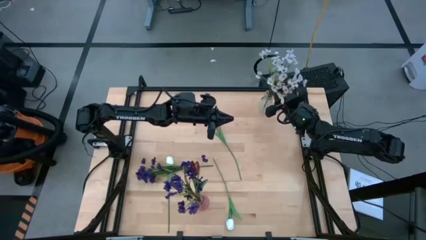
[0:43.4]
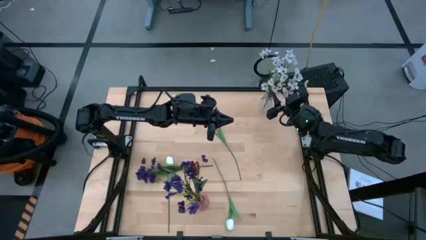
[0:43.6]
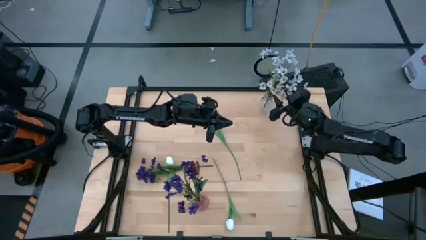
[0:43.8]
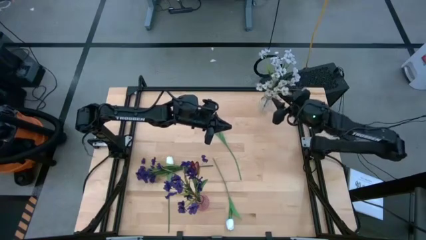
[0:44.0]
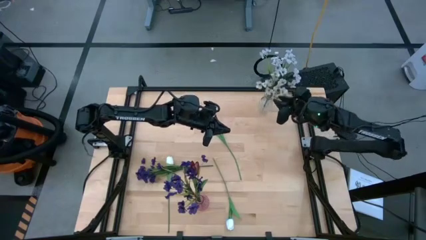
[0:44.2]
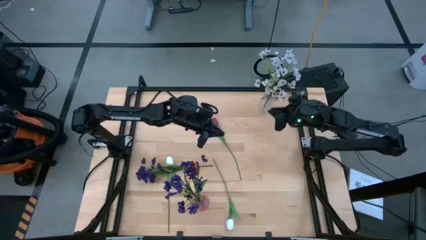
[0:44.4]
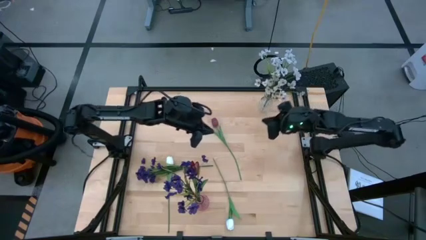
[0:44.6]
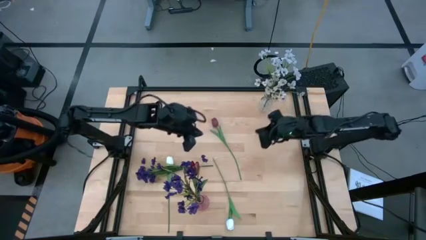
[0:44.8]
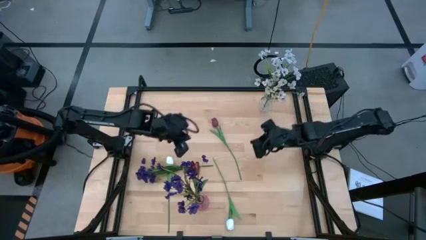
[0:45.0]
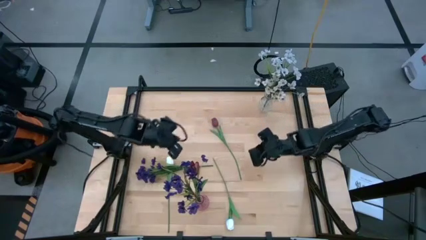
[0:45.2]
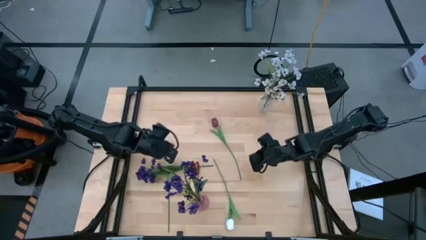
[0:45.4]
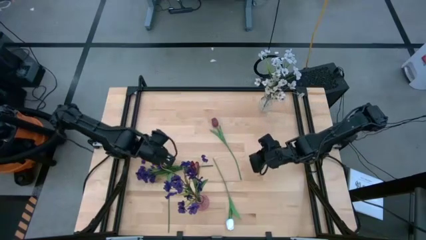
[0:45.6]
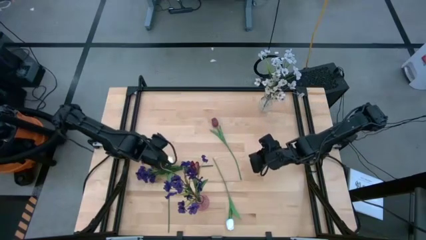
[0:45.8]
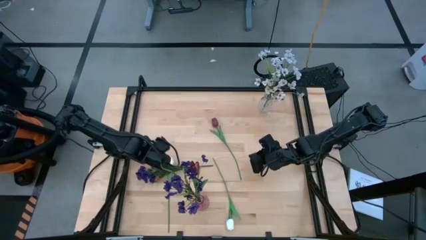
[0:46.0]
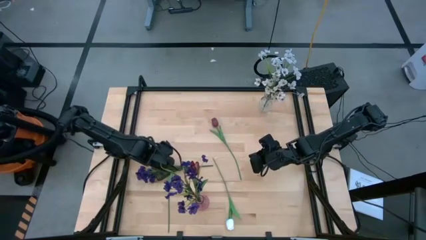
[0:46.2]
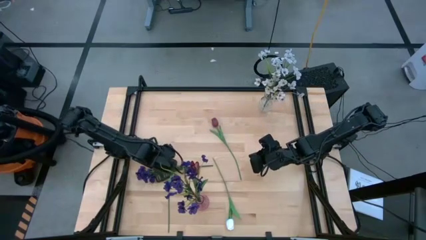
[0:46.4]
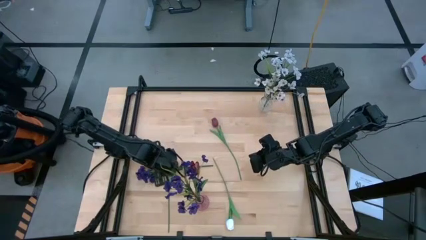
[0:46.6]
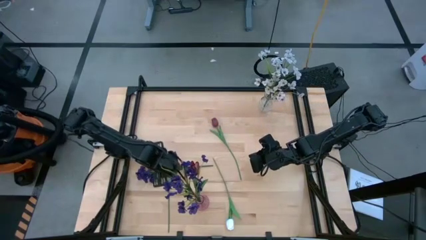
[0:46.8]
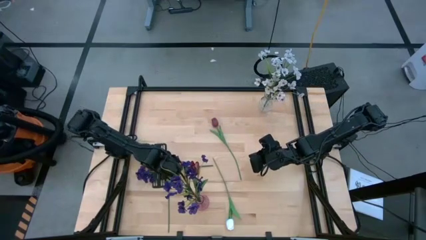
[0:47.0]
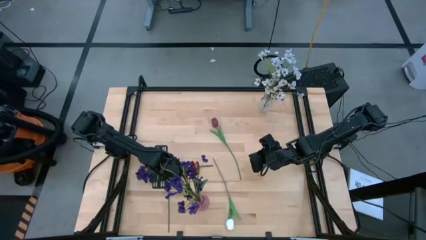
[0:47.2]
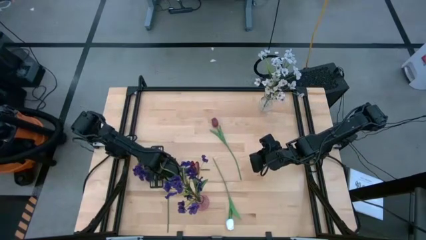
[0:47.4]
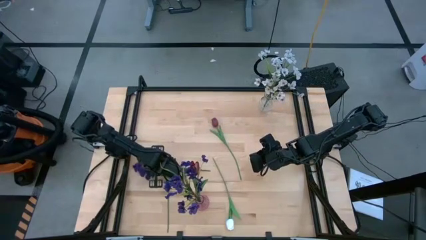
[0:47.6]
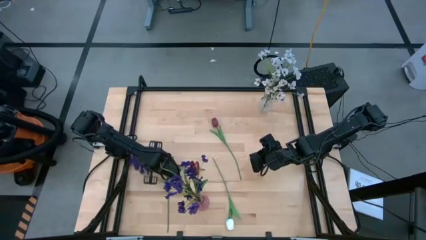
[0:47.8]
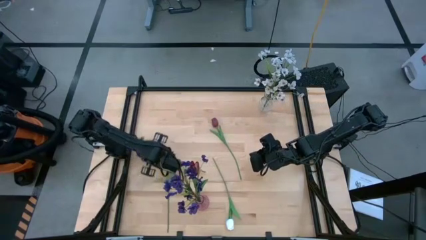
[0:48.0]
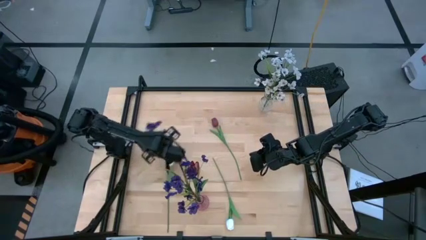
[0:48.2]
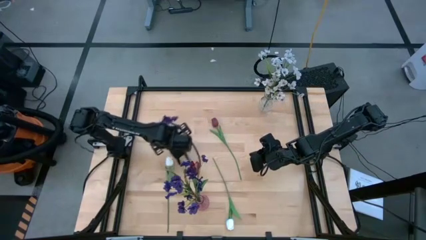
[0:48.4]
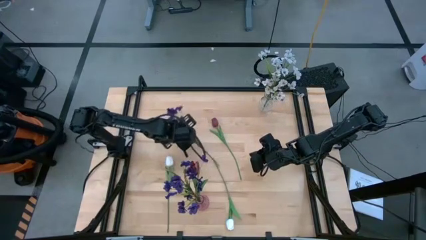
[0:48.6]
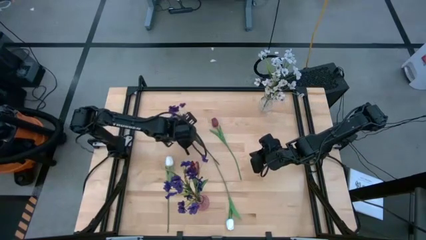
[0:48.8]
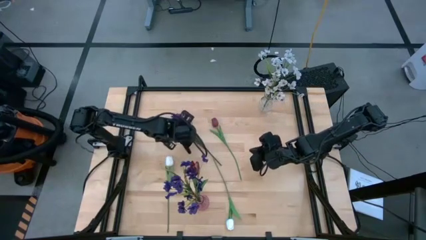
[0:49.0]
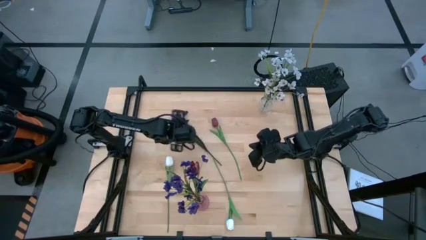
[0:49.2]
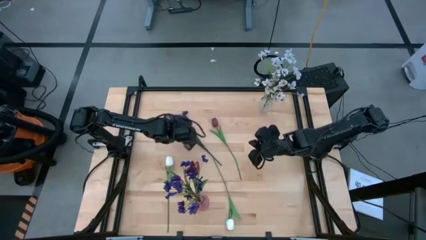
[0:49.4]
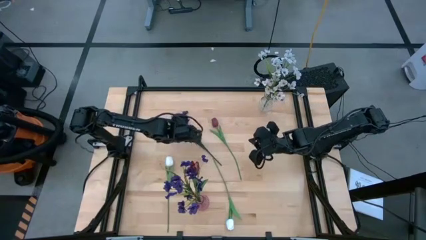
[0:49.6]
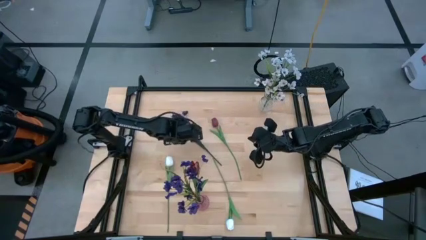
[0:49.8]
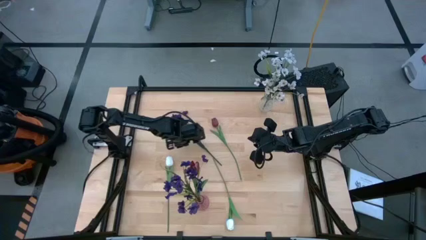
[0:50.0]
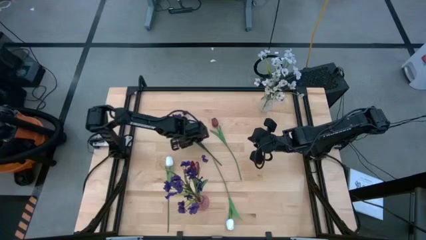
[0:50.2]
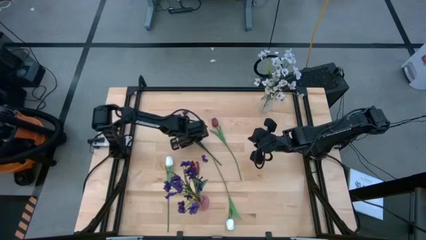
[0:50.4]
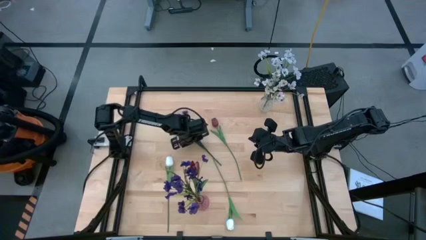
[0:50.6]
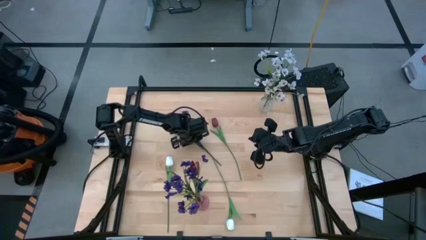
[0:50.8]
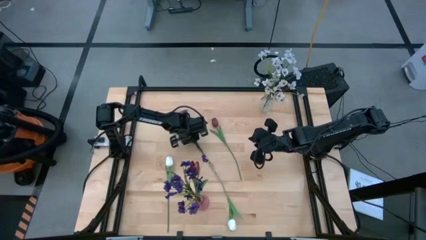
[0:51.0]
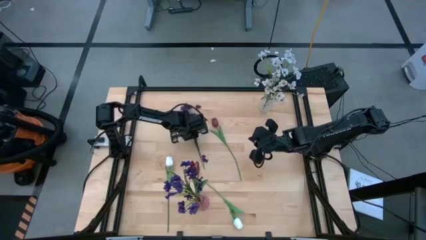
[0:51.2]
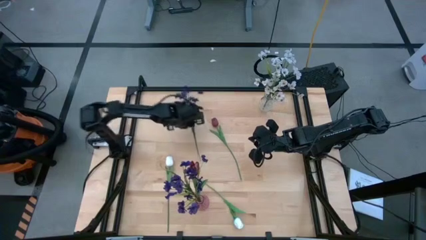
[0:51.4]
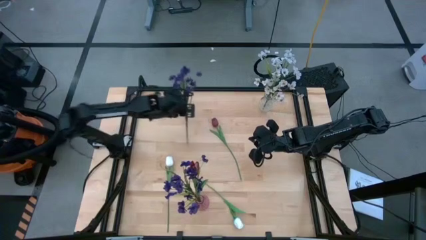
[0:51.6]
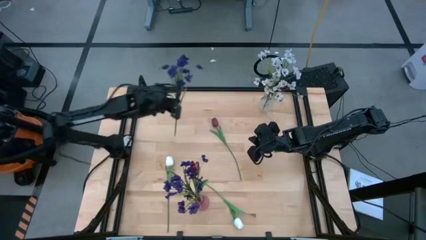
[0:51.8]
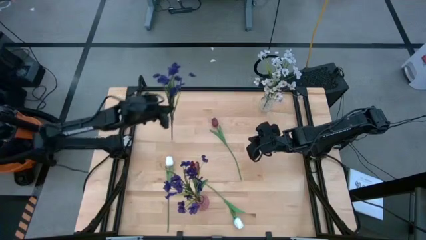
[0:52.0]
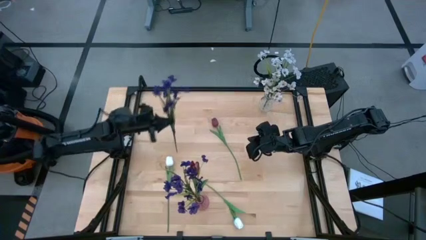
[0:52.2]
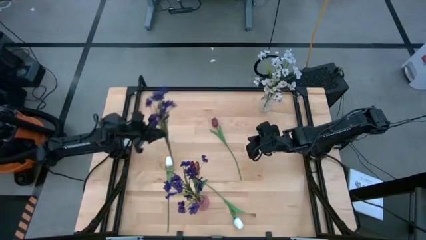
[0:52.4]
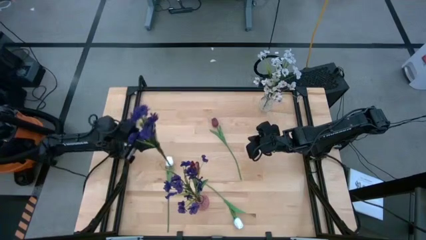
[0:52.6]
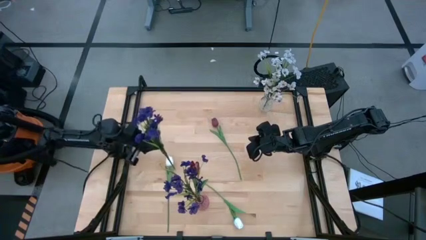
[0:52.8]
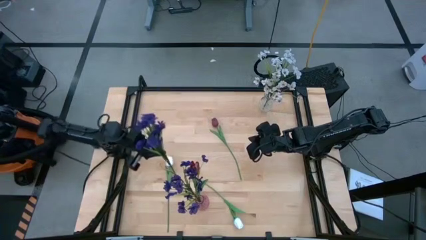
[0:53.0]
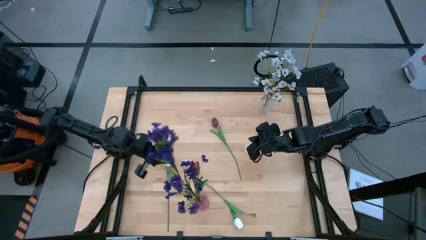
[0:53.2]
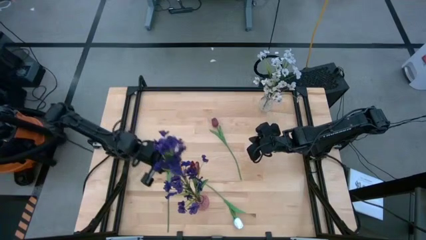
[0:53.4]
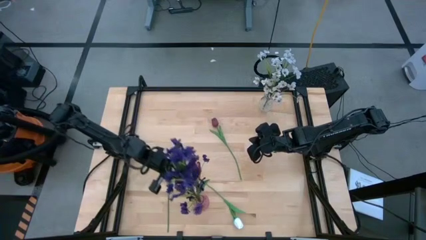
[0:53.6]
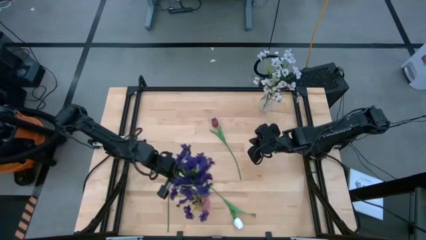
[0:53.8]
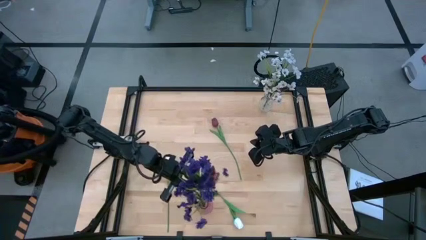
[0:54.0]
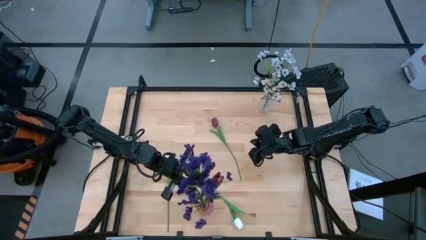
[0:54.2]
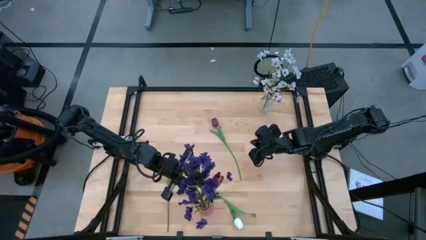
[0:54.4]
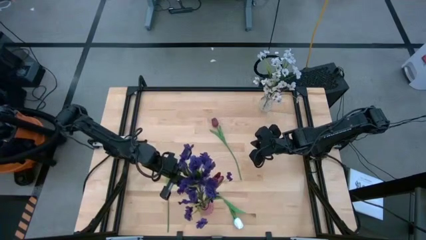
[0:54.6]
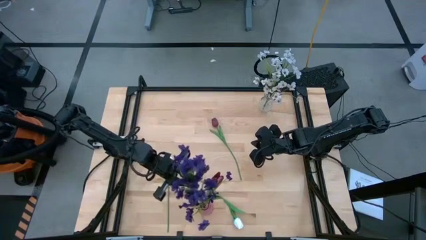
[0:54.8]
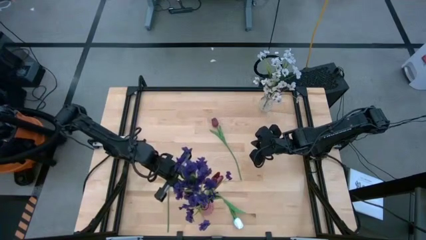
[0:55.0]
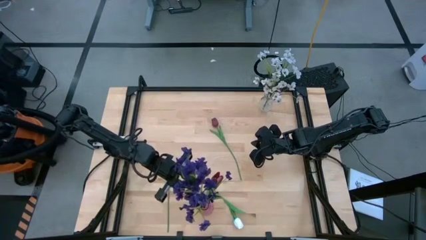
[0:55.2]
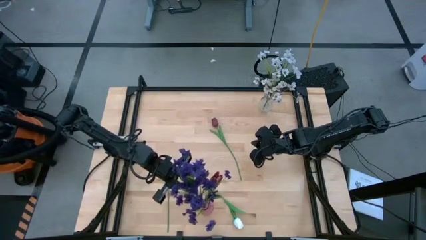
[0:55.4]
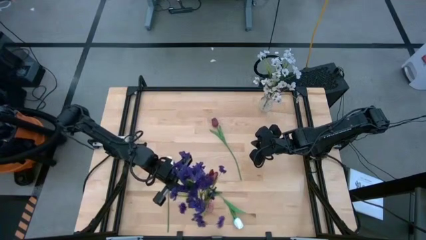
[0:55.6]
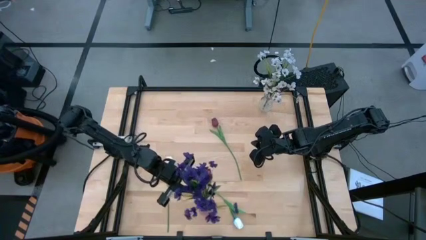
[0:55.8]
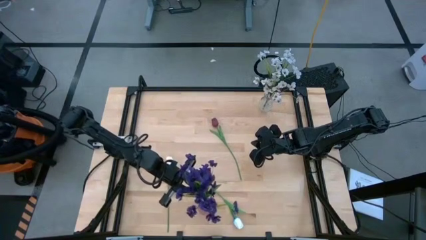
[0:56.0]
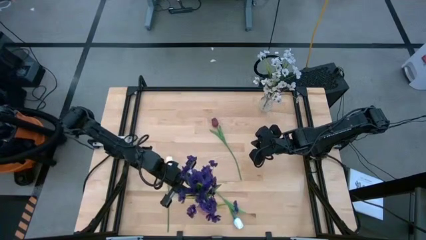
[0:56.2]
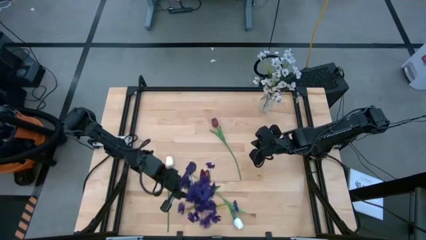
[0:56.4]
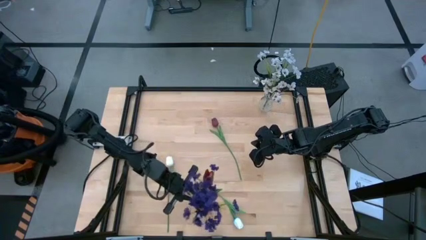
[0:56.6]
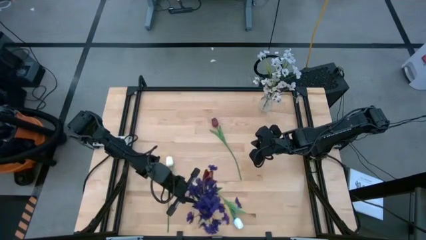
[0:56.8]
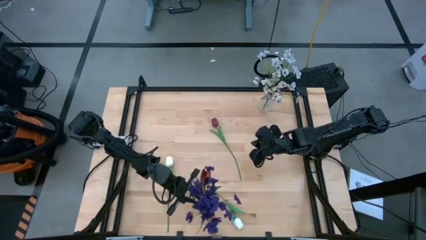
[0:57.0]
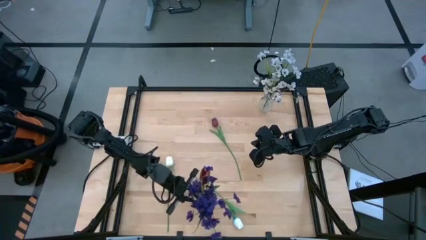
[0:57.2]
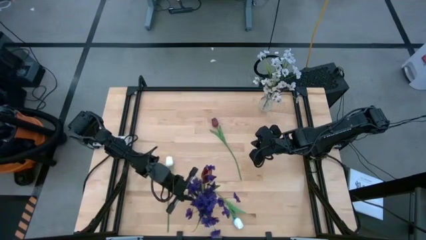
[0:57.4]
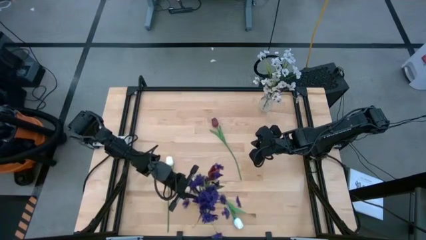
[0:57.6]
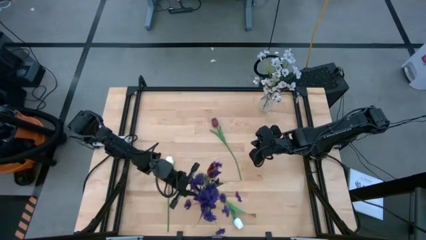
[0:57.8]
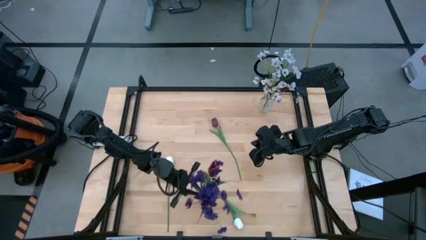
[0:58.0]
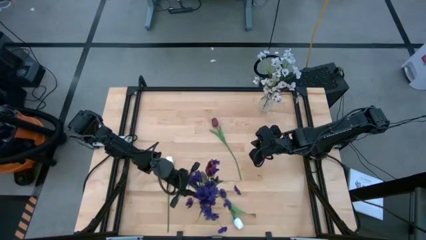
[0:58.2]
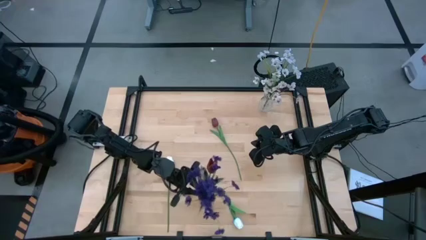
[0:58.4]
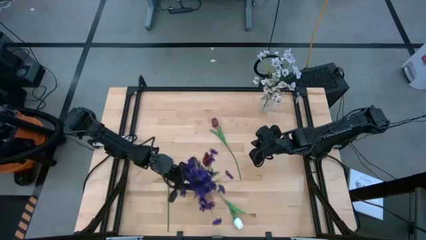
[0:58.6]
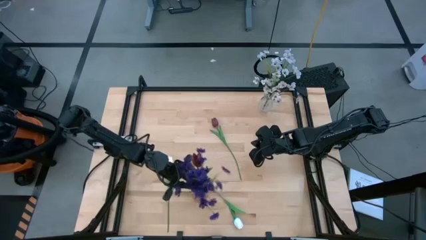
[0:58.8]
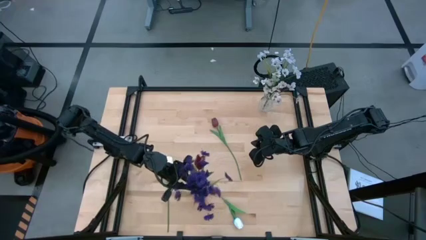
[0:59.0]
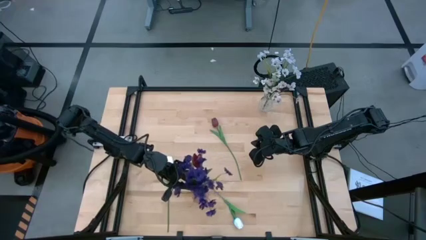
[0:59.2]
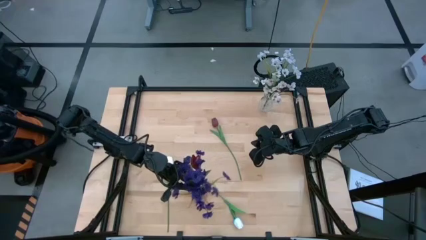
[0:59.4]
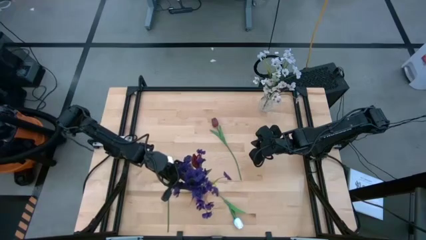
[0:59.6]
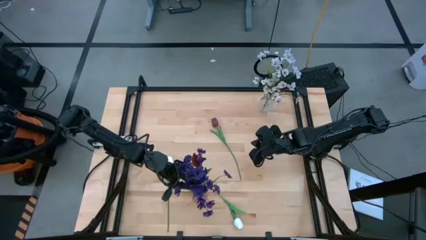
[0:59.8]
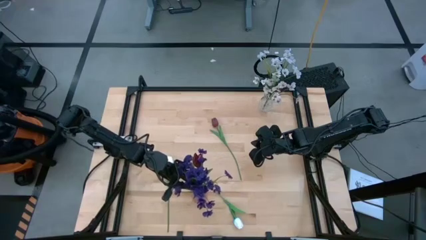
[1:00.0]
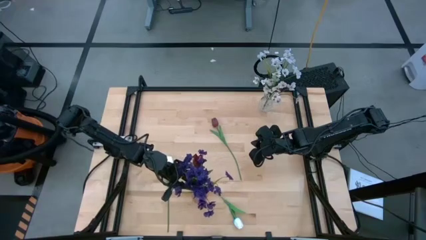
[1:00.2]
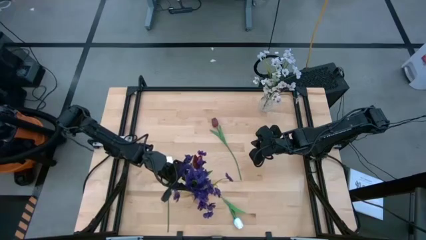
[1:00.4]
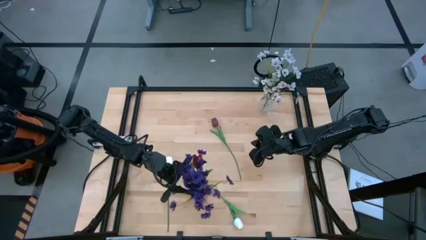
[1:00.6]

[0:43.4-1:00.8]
Task: Sort flowers into vase by color
Put the violet flower into the pink vase
